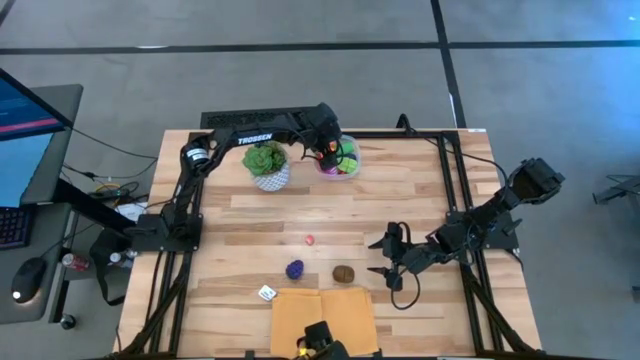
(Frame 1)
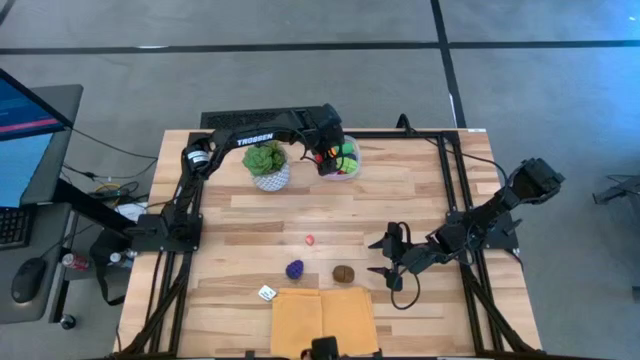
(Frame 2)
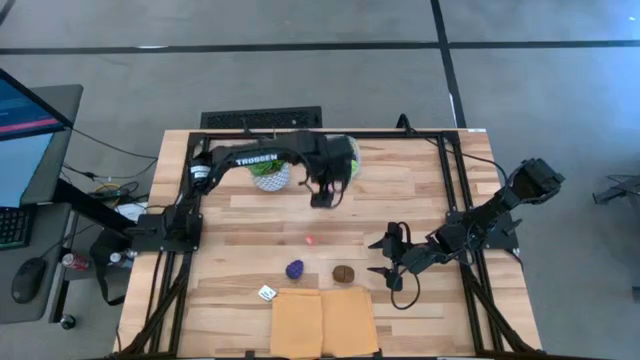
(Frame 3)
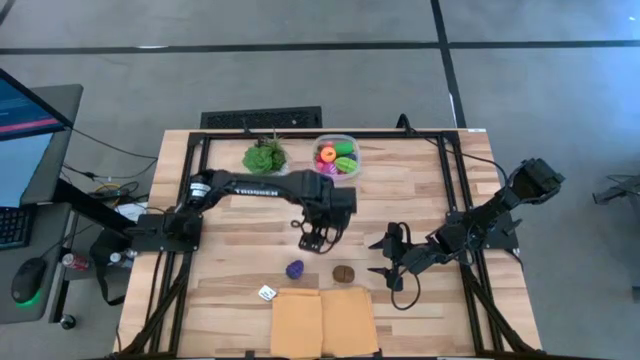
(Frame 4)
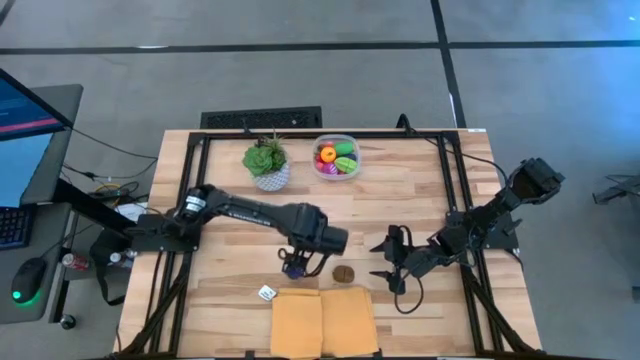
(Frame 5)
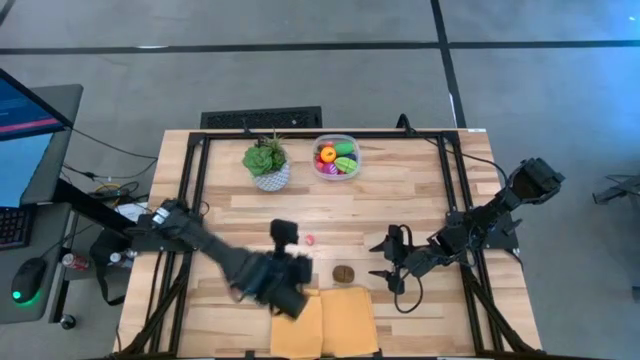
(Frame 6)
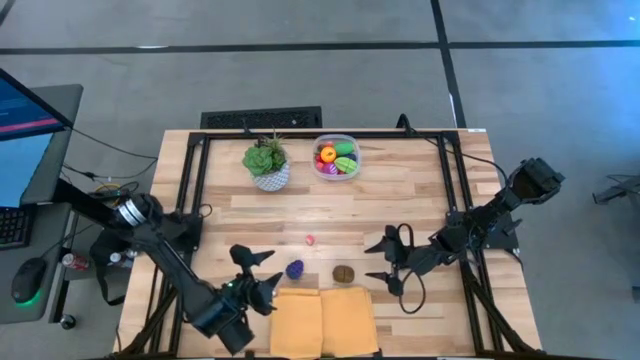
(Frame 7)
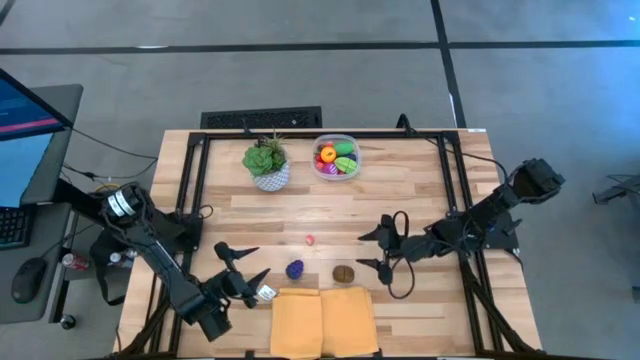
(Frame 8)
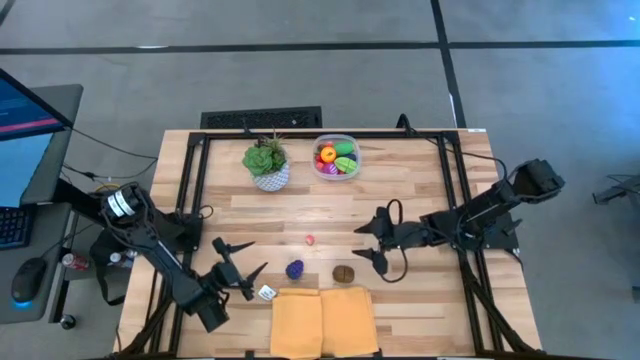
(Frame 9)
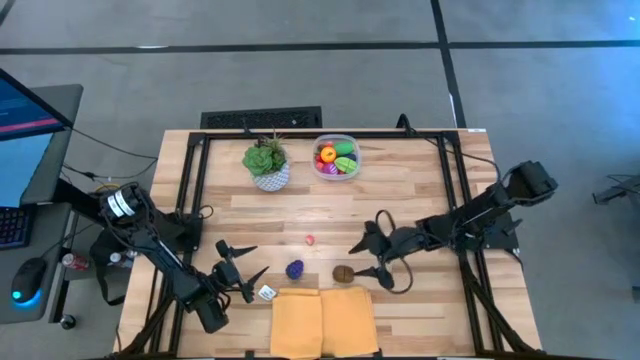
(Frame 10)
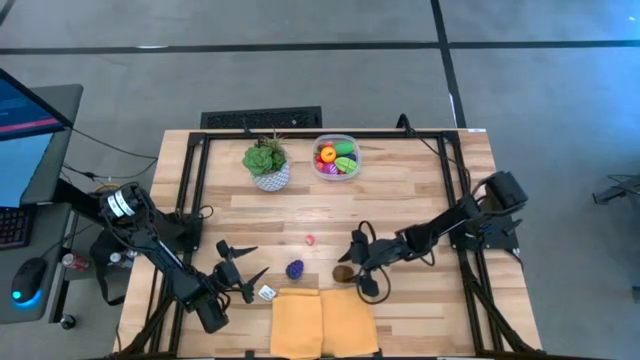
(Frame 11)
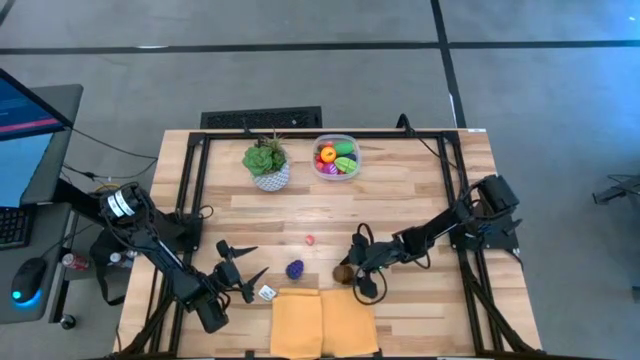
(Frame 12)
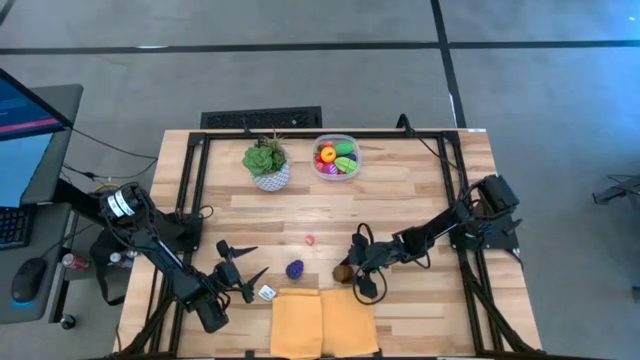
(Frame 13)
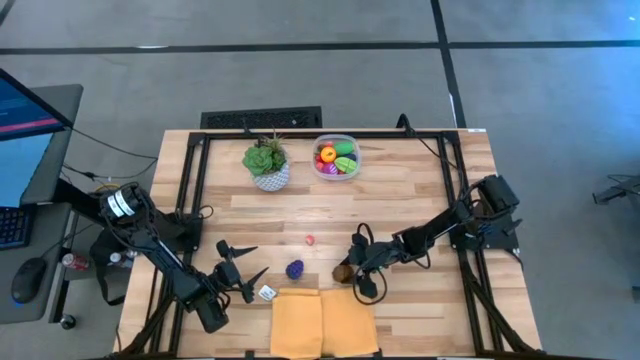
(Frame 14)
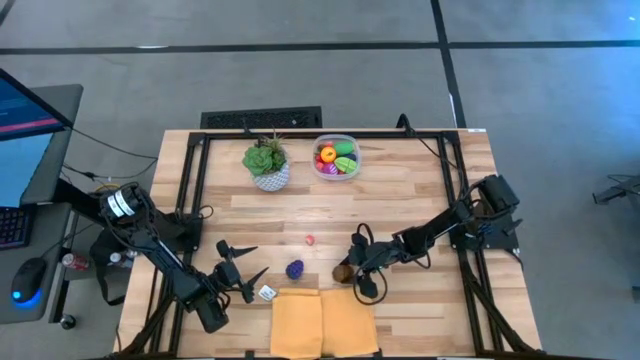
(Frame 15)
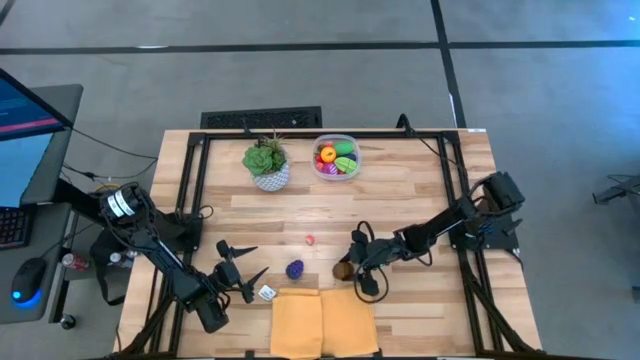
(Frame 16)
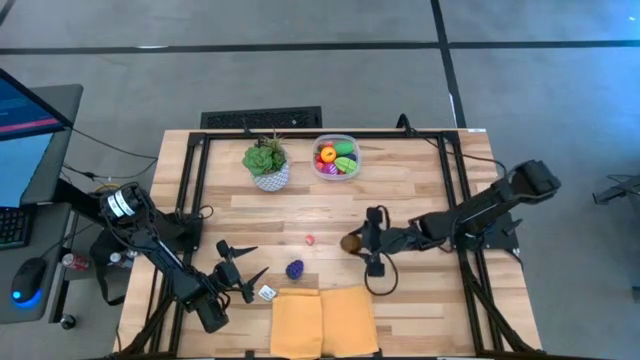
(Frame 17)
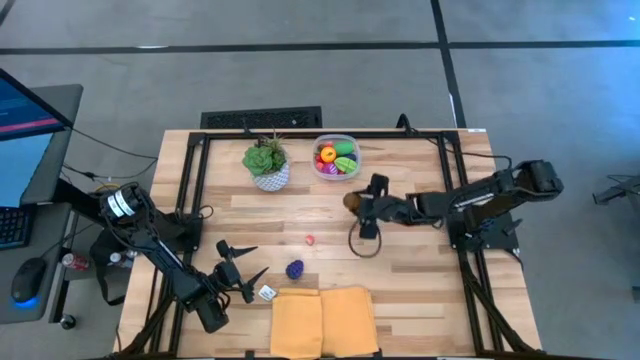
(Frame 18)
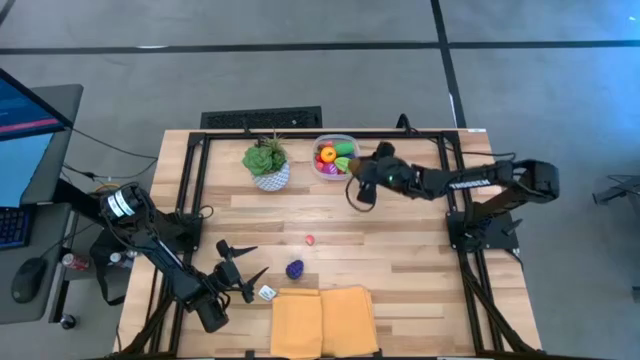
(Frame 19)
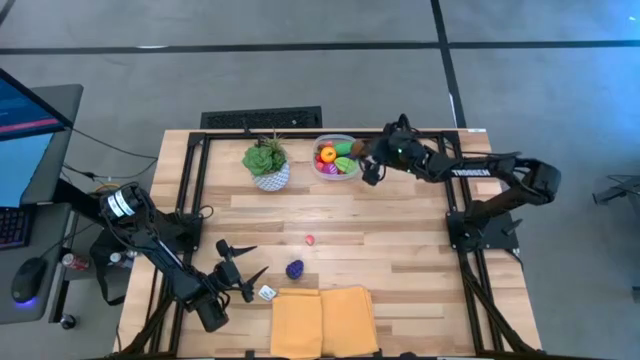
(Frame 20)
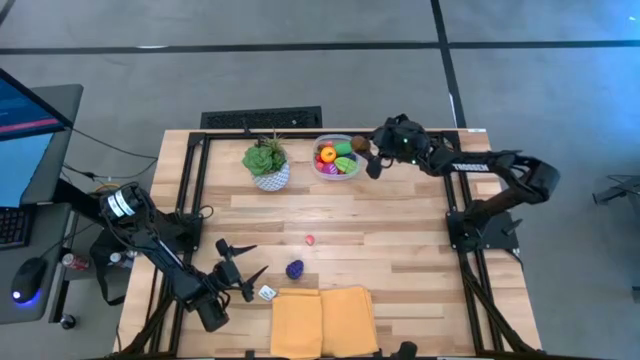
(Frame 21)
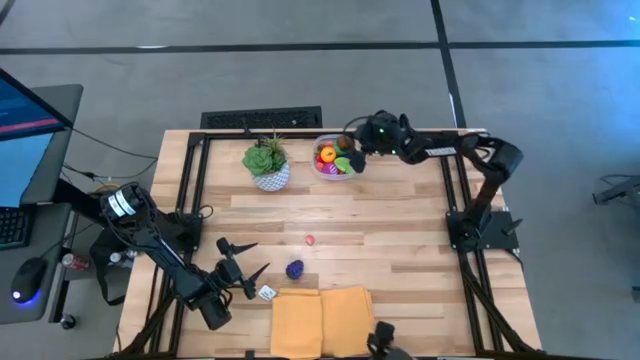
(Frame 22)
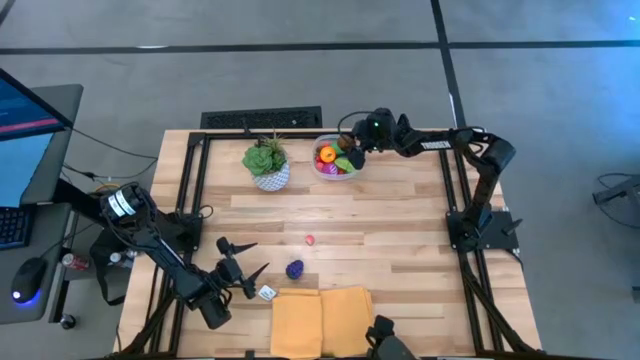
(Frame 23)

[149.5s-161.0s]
Task: Pick and placing Produce into tupperware
Put the kiwi into the transparent bin

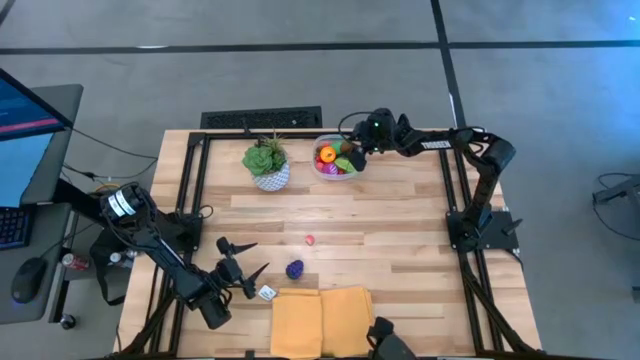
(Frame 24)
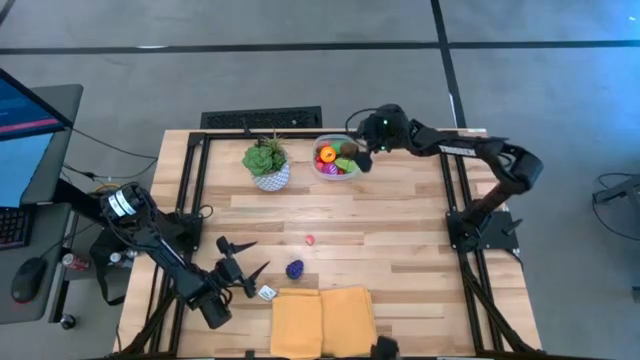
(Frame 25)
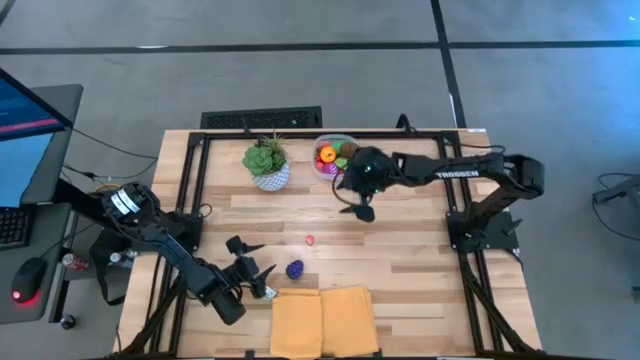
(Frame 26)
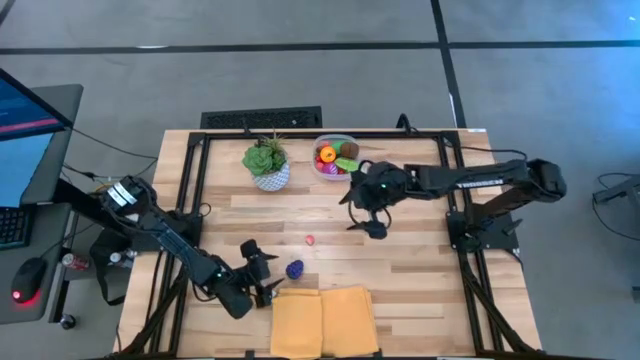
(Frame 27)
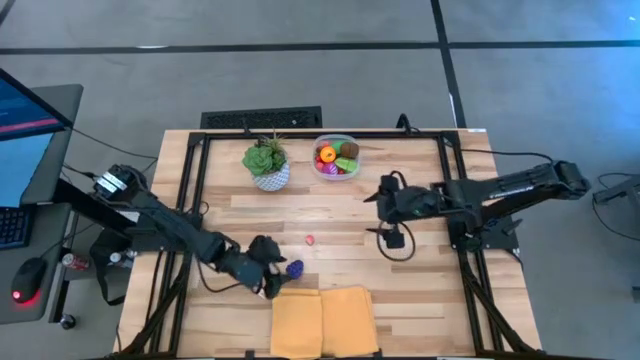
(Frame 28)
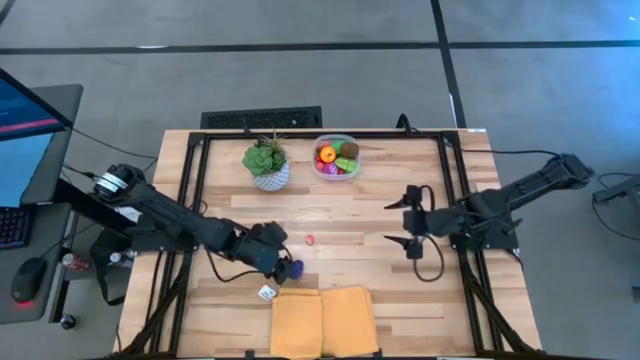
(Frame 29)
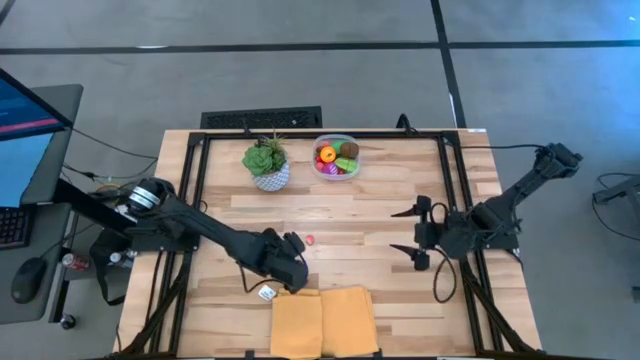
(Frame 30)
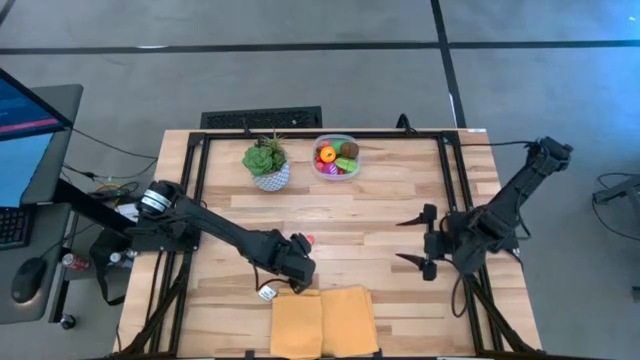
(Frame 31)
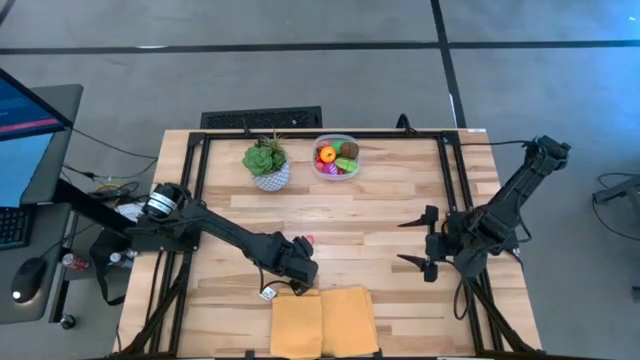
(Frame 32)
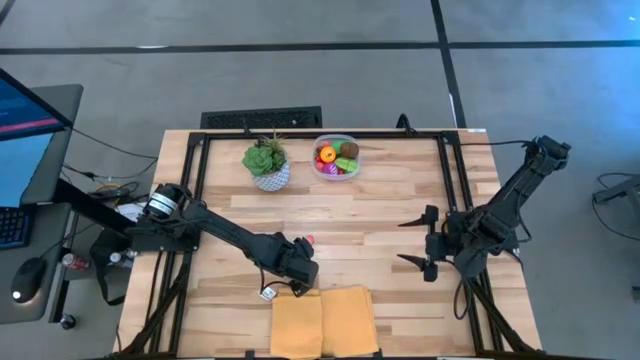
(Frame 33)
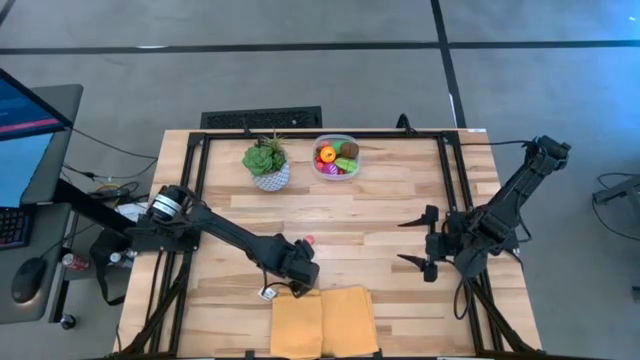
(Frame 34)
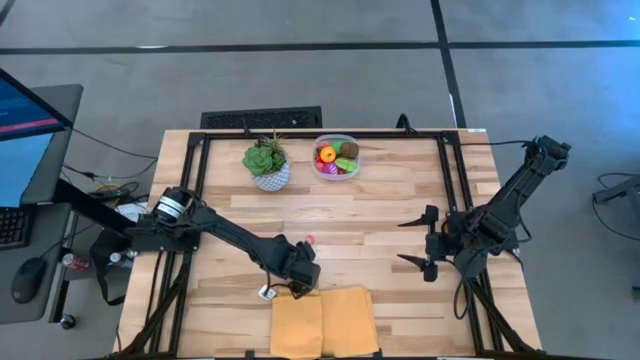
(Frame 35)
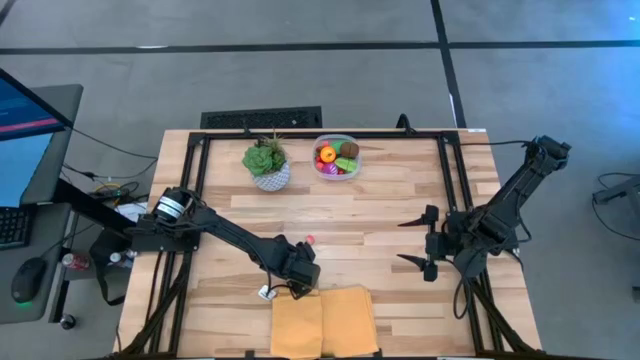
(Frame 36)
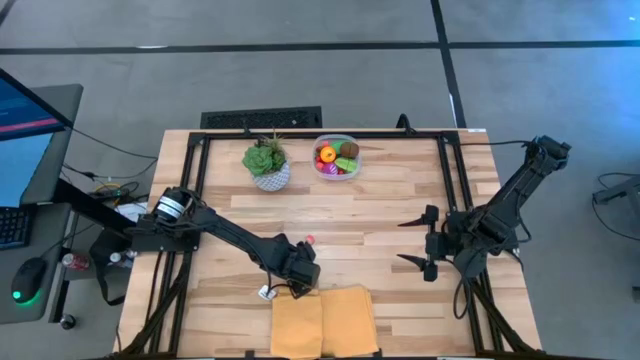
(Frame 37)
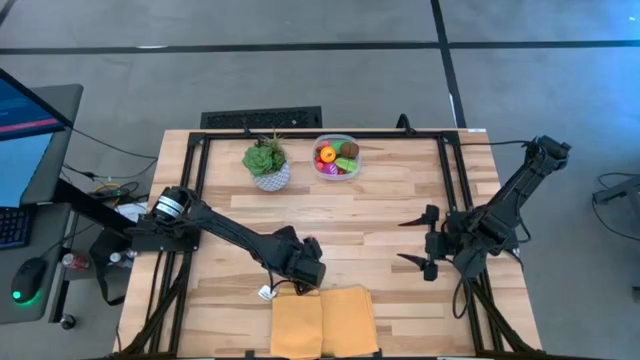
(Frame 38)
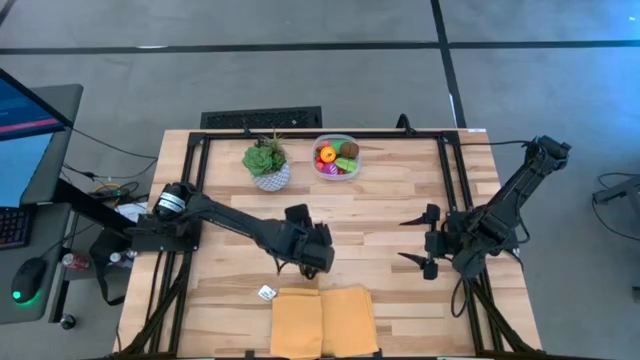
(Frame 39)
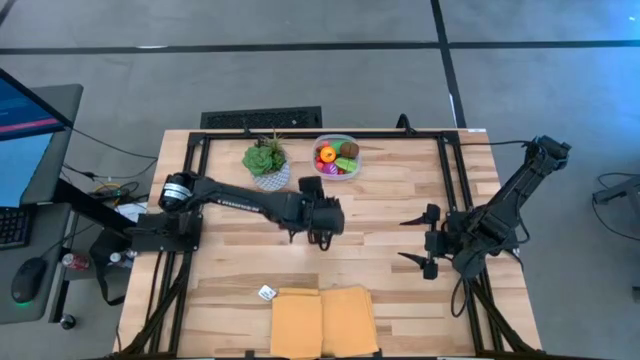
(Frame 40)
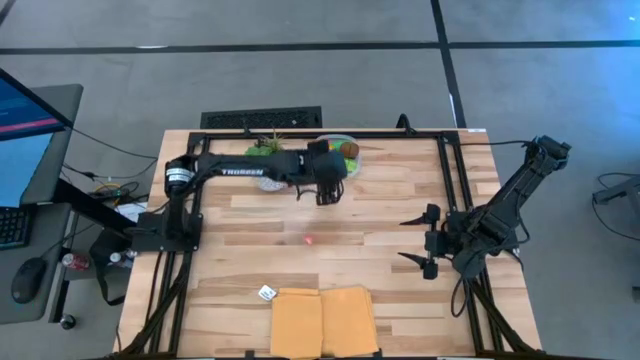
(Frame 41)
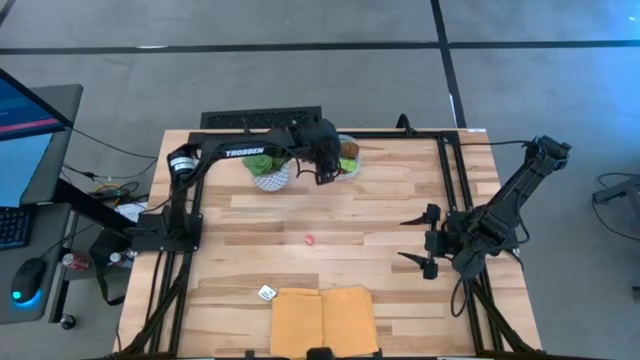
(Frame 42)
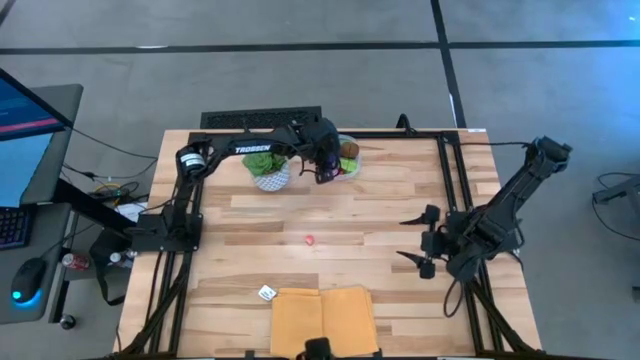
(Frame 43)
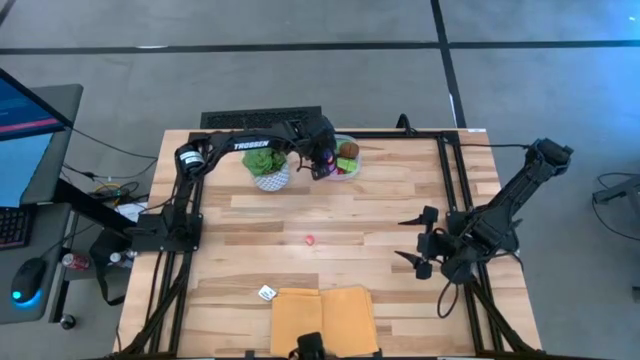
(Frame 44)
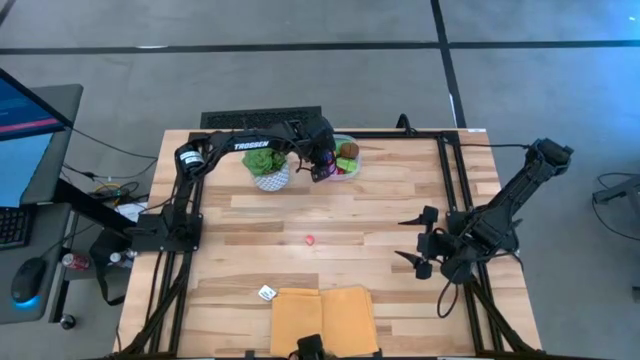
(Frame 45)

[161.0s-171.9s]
Put the grapes into the transparent bin
